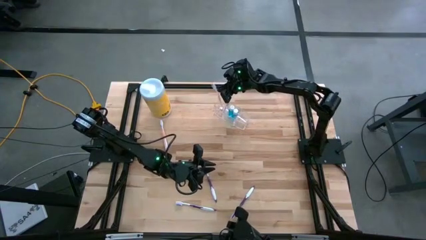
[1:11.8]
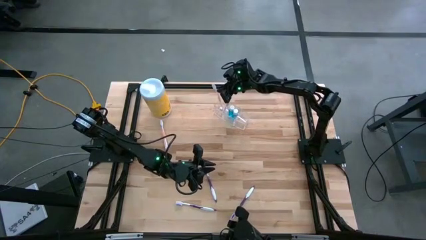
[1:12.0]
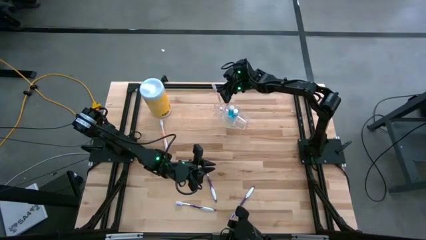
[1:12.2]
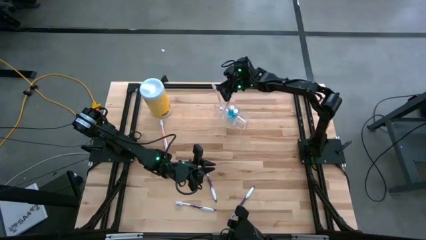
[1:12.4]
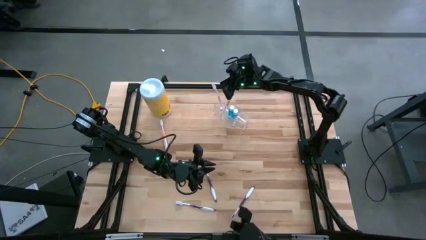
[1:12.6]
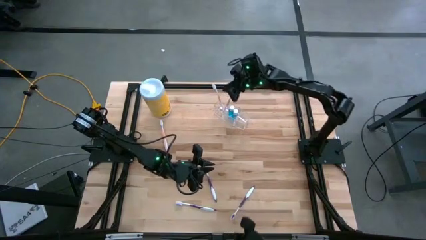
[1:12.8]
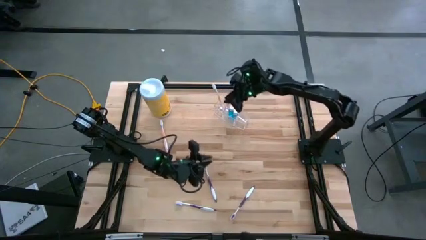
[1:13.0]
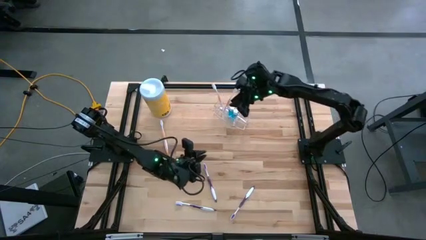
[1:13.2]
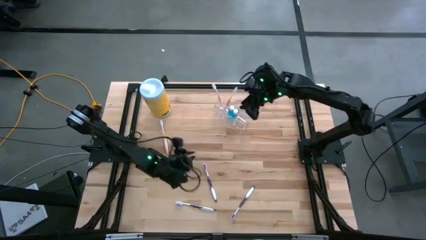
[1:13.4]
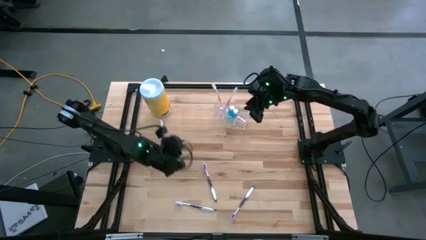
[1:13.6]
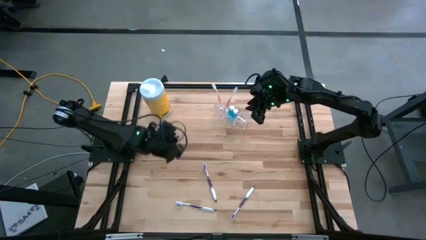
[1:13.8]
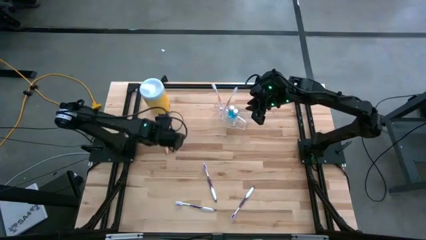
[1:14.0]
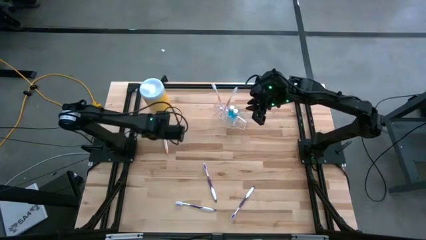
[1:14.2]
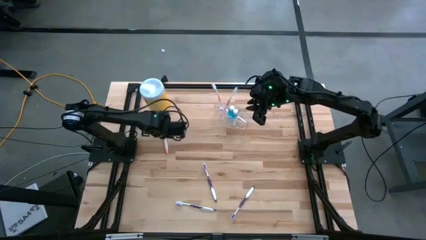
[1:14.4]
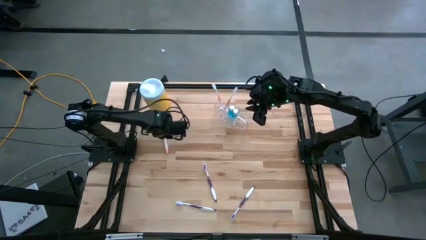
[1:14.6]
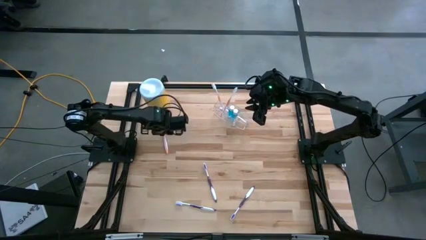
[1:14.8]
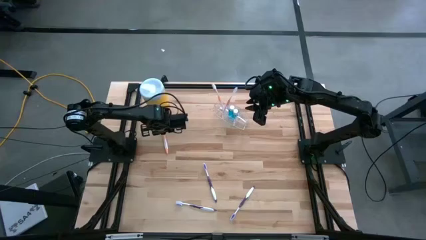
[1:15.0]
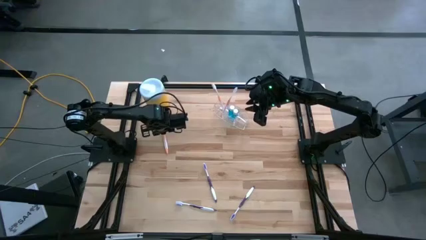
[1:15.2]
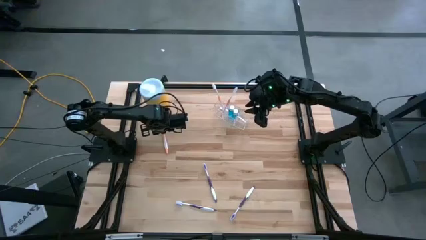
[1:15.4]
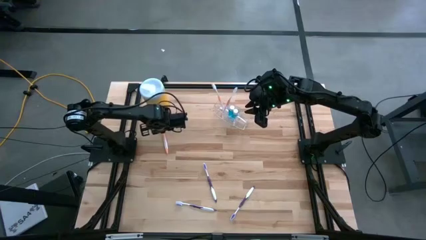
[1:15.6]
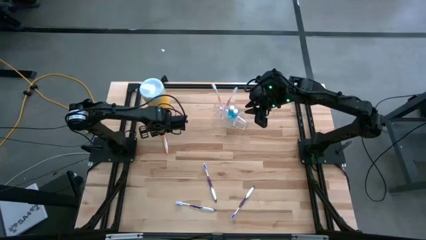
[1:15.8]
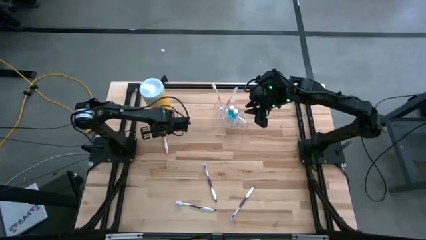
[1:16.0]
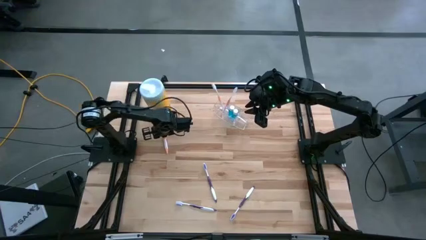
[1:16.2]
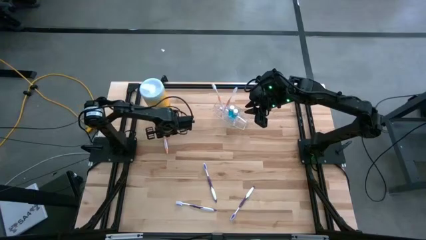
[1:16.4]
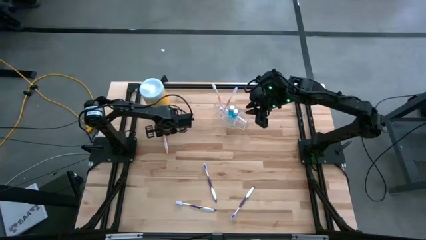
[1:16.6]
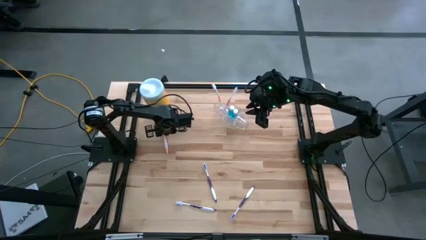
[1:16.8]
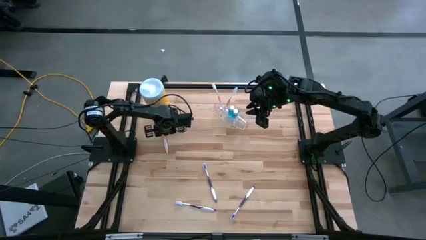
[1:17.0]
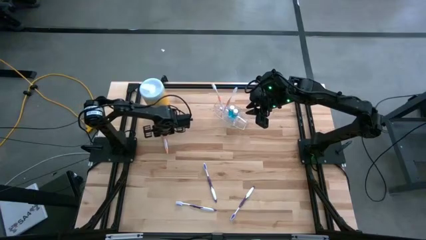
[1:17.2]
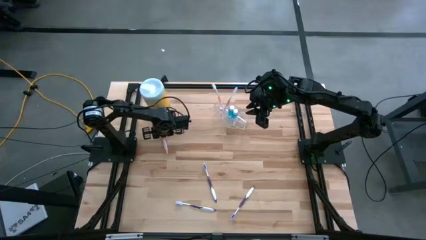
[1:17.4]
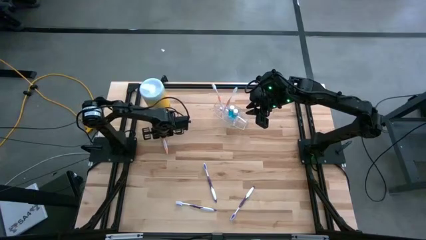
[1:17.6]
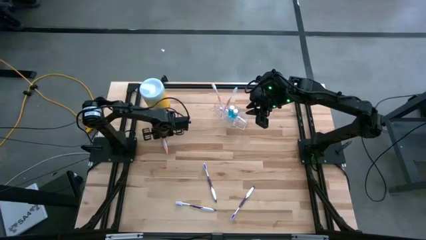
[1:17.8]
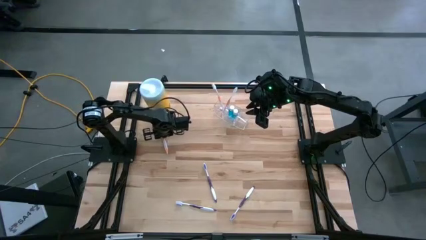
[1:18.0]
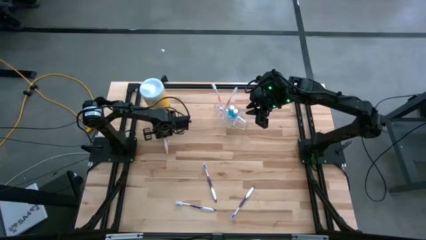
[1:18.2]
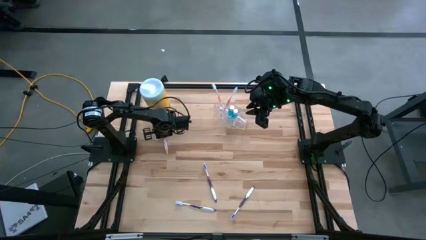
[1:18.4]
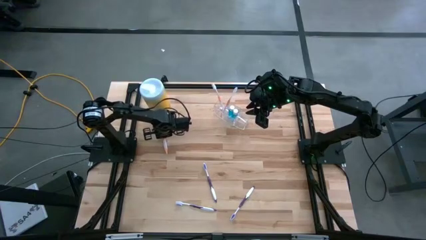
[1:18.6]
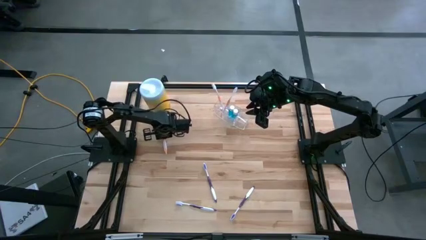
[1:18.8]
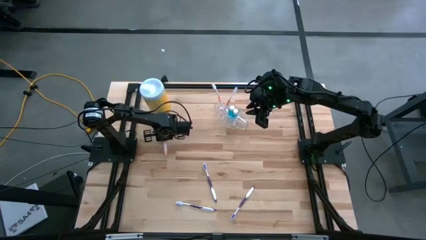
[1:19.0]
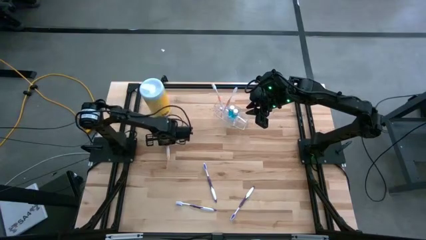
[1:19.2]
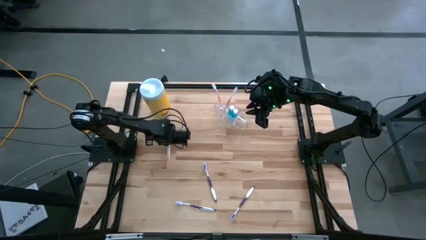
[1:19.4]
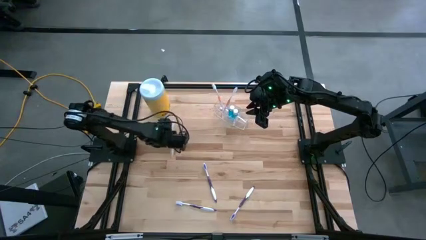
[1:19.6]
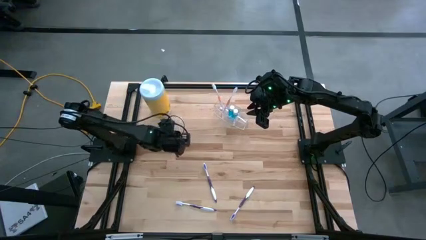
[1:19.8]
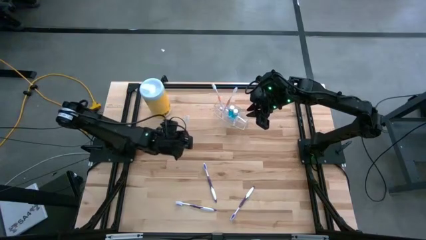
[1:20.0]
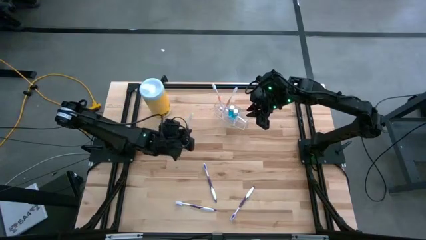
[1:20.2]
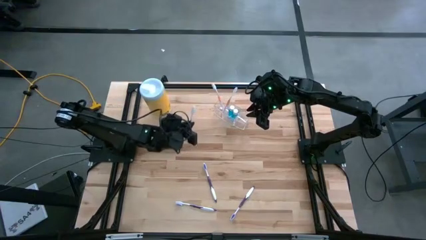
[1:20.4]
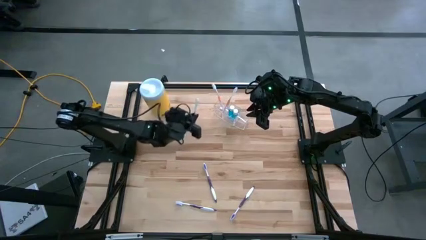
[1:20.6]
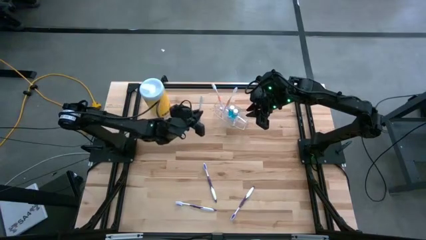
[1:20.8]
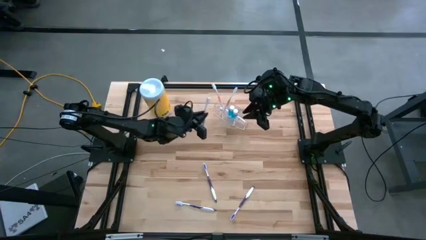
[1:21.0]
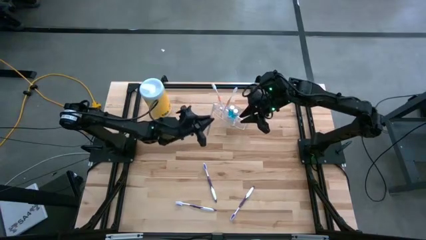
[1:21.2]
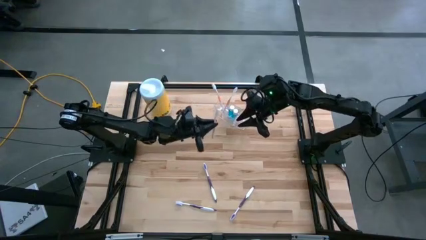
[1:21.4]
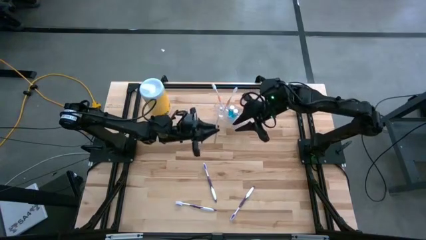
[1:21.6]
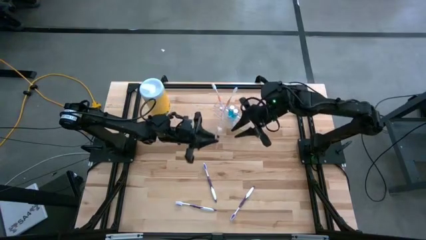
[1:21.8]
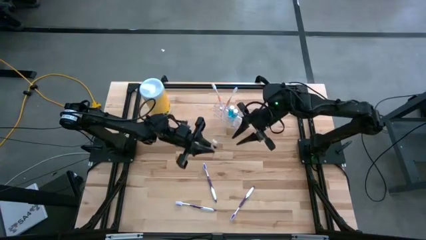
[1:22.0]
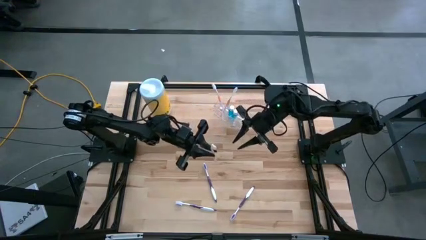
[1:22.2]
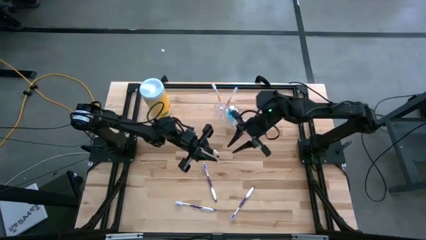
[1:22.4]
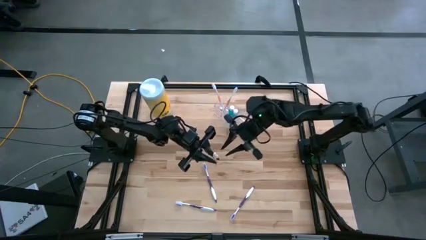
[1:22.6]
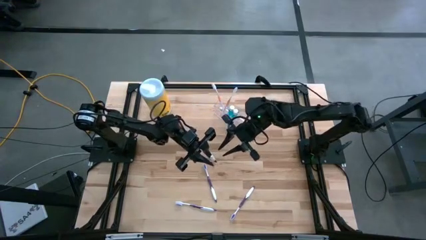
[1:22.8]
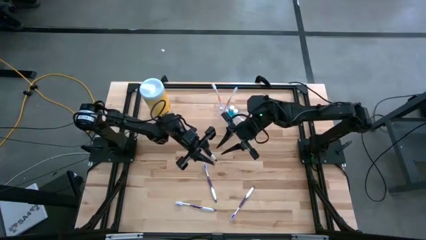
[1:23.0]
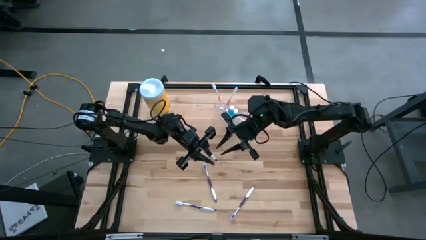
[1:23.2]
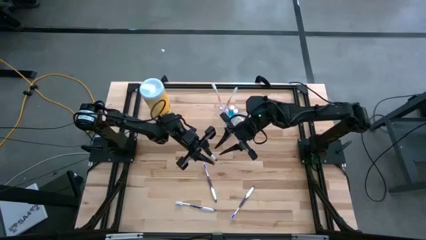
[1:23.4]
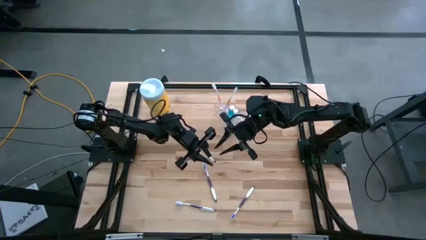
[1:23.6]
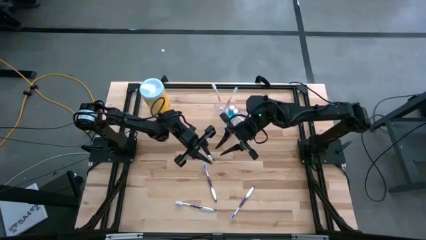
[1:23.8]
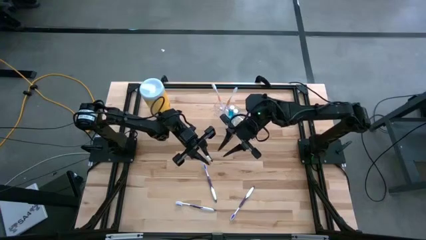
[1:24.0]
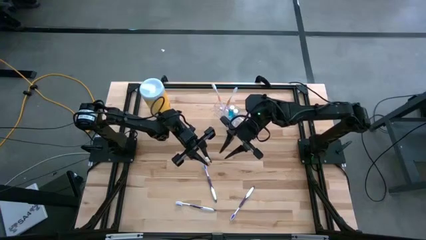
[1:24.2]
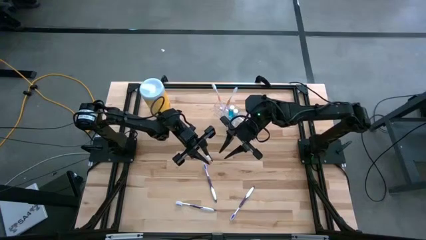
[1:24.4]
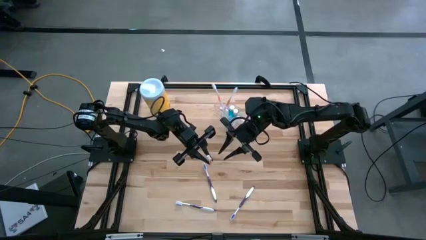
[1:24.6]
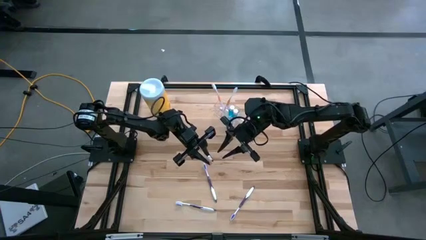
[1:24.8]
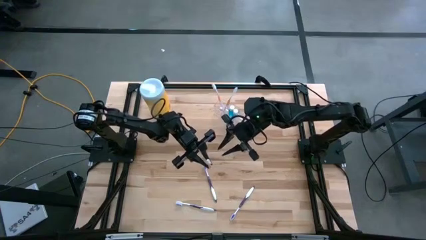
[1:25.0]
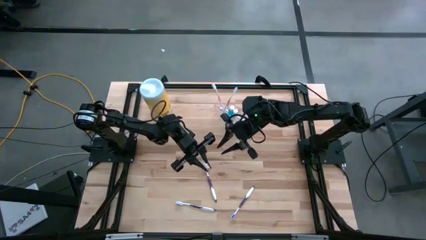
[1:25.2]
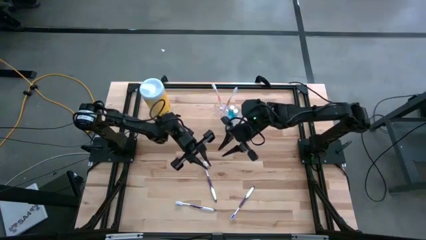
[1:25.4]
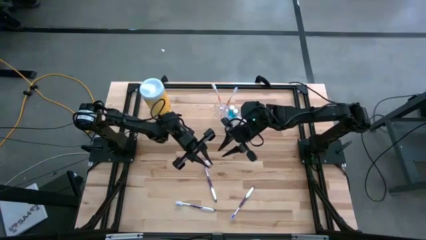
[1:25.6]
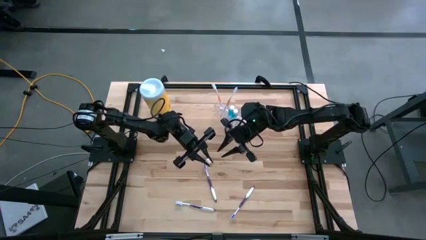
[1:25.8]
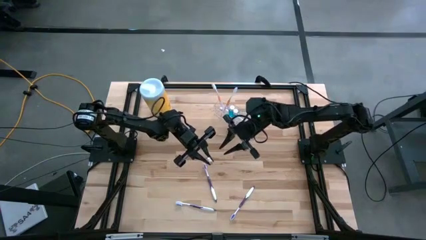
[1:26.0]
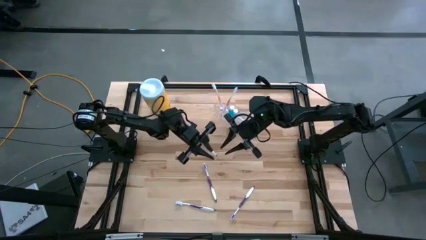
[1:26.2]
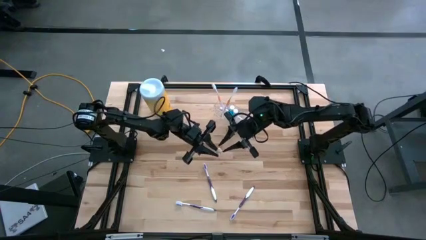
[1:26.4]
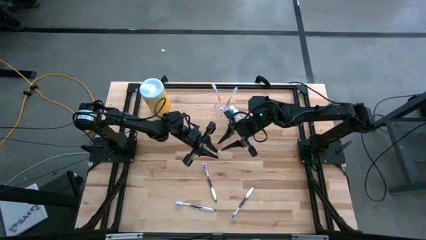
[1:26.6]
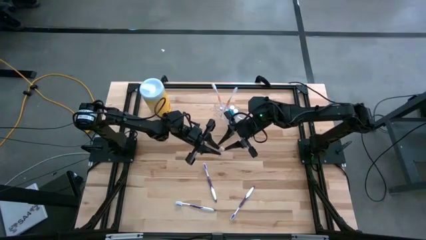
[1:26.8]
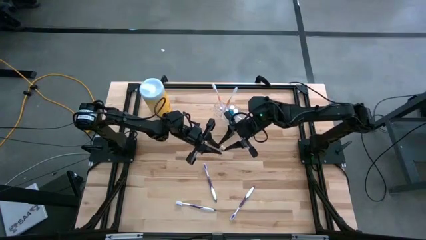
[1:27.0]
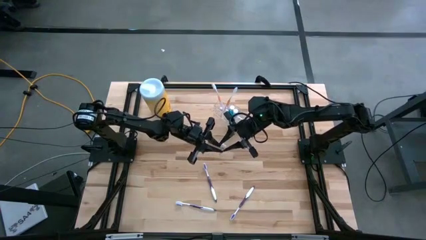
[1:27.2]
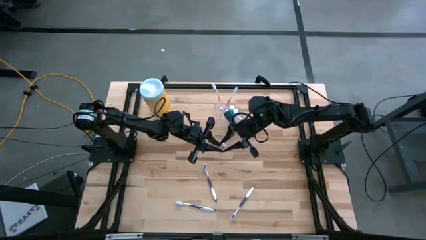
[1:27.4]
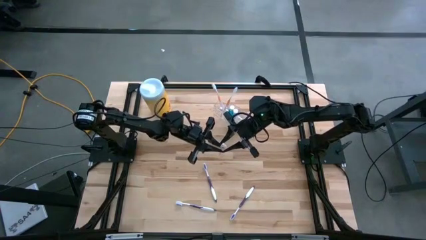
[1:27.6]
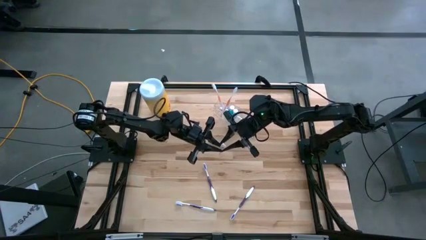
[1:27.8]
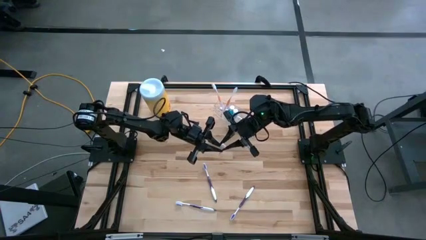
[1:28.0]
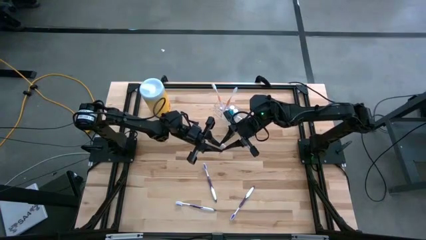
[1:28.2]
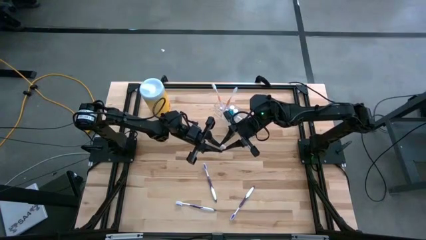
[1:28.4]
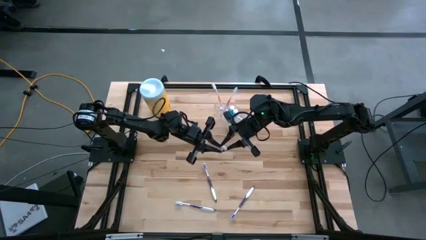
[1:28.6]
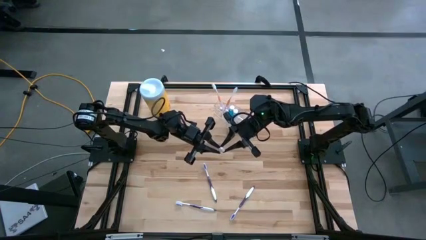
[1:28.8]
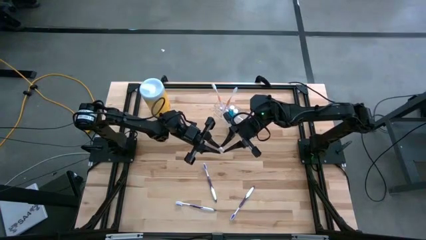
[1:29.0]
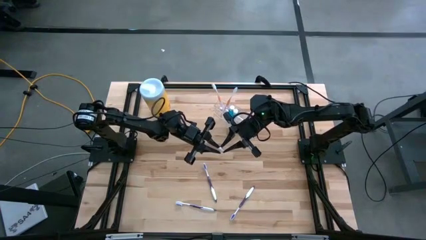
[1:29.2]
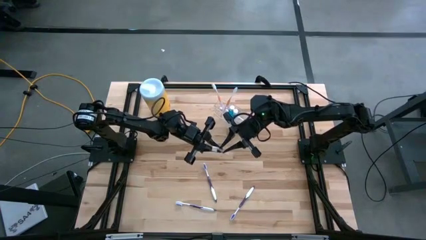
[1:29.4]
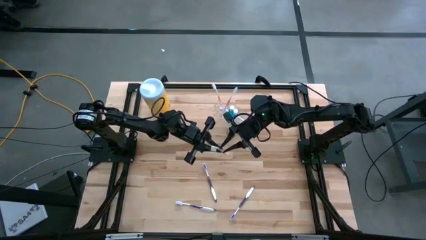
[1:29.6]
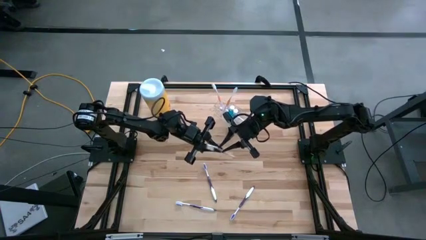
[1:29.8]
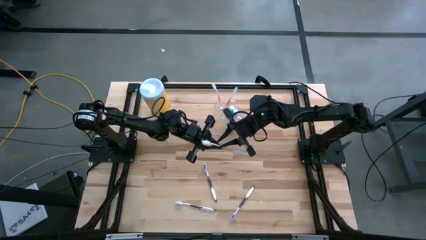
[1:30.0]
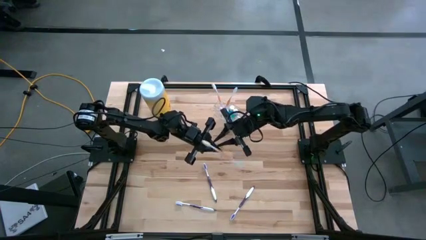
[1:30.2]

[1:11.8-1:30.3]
Task: Pick & Place toothbrushing station
Put the orange toothbrush into the transparent organizer
